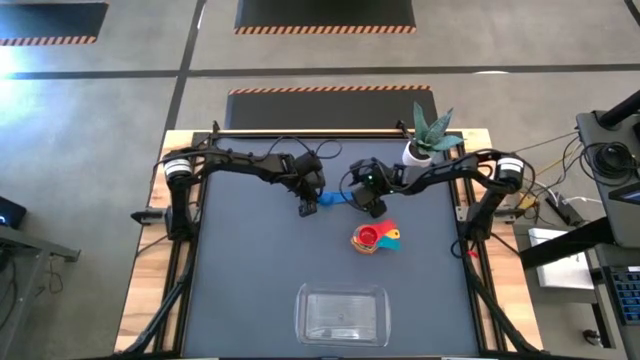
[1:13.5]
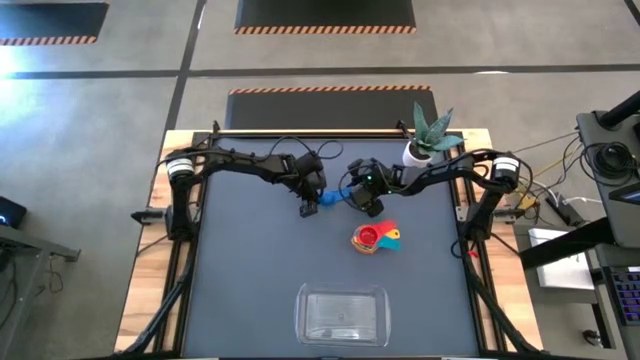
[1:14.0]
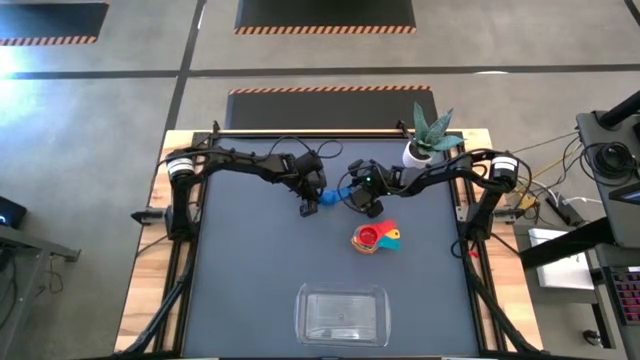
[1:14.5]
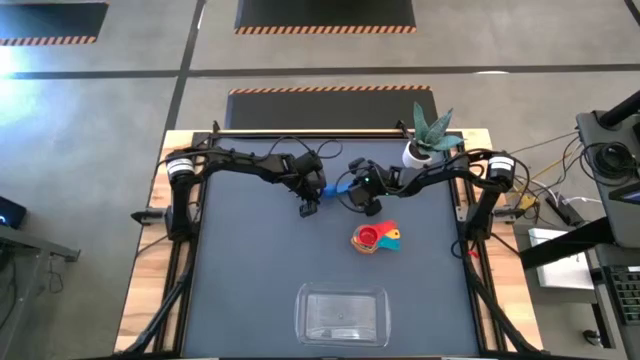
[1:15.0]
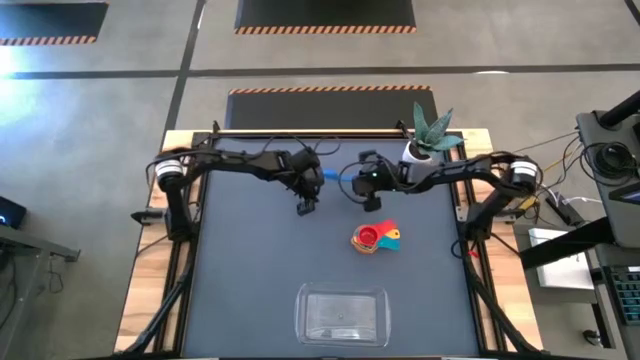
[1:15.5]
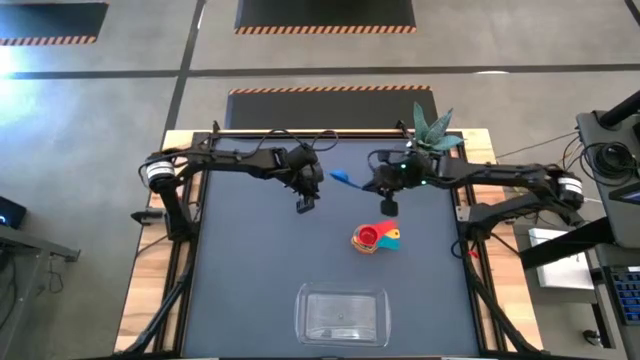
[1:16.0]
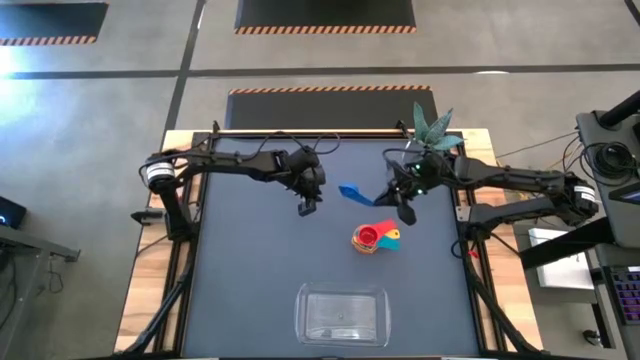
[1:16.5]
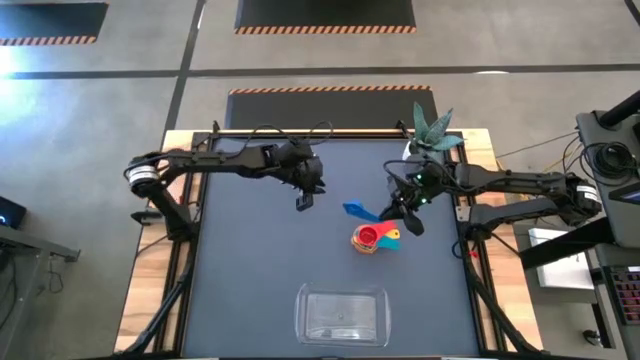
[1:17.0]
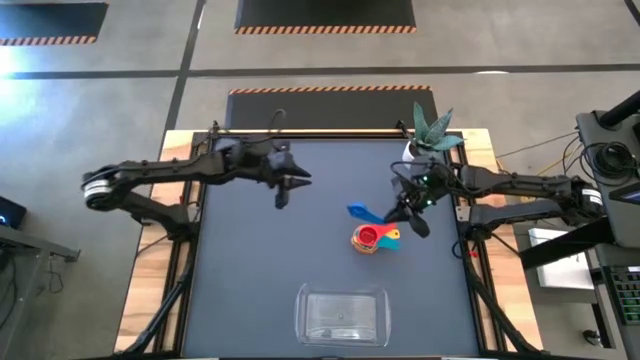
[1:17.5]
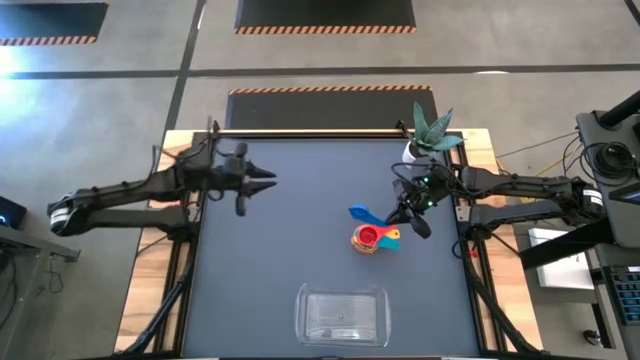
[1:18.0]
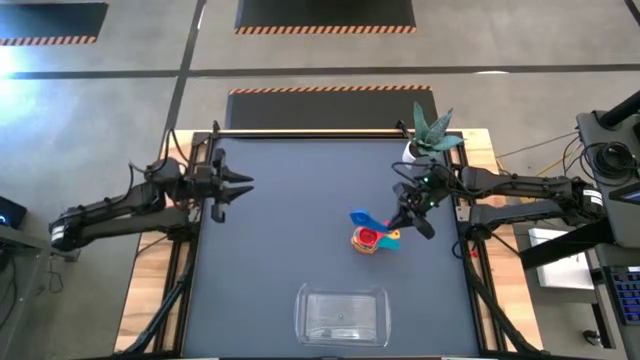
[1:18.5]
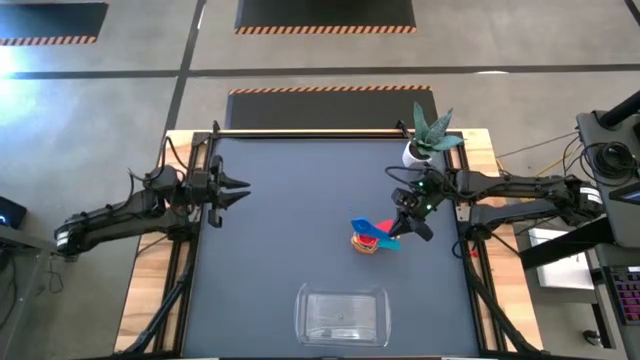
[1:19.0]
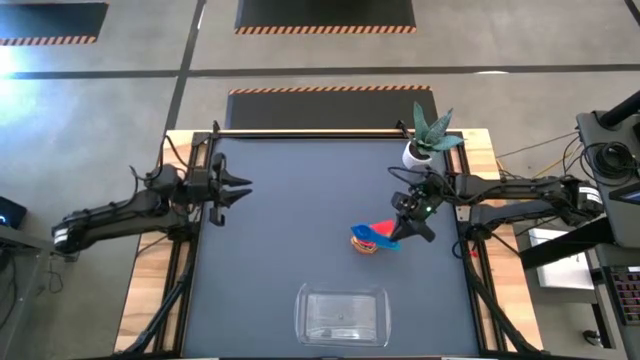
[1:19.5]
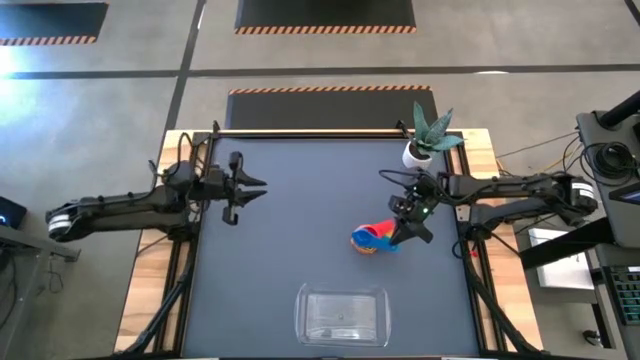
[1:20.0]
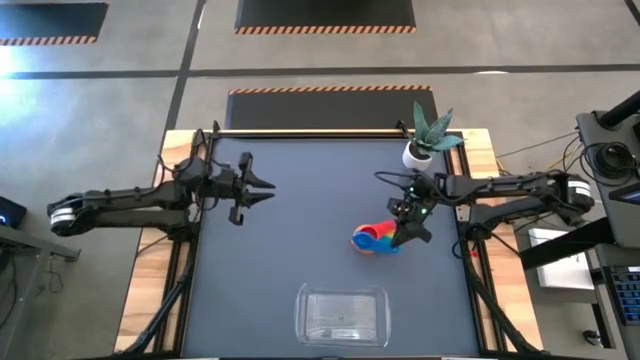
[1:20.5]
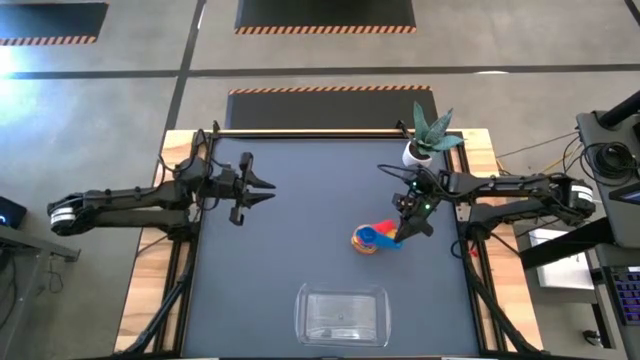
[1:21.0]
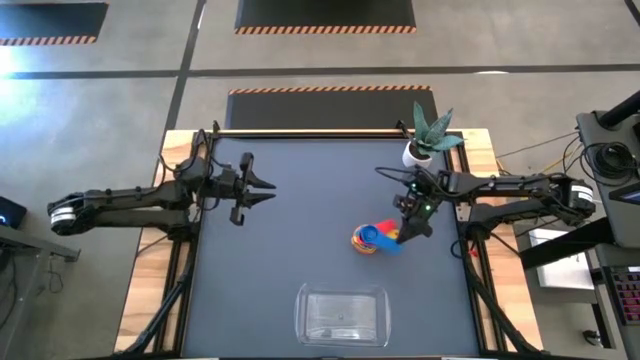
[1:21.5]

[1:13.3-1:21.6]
Task: Nest measuring cups in basket
Stack the red measuring cup into the light blue measuring cup

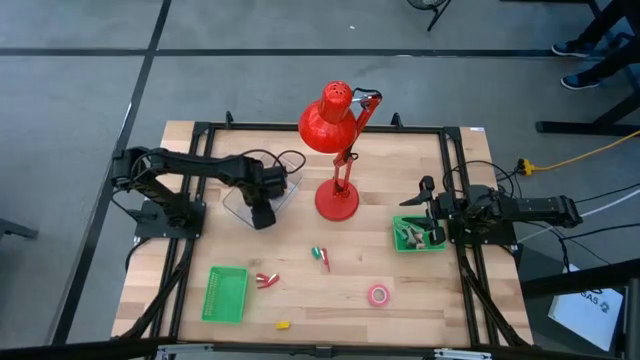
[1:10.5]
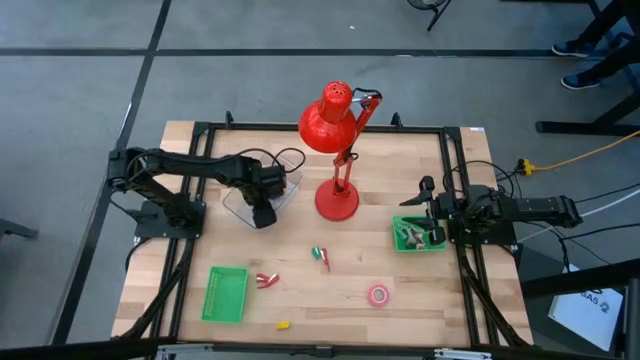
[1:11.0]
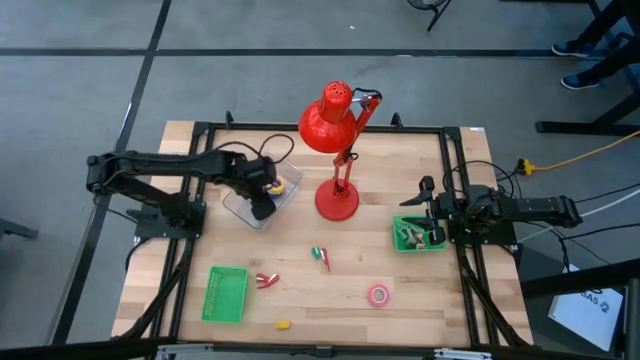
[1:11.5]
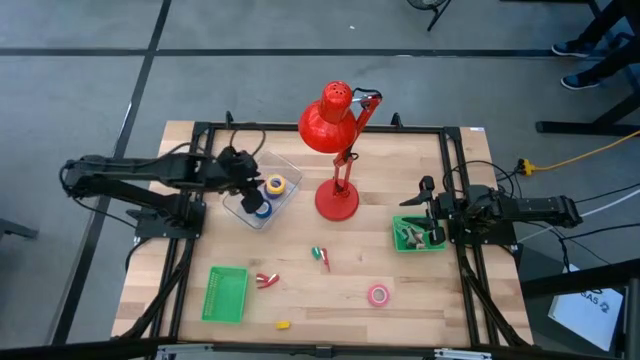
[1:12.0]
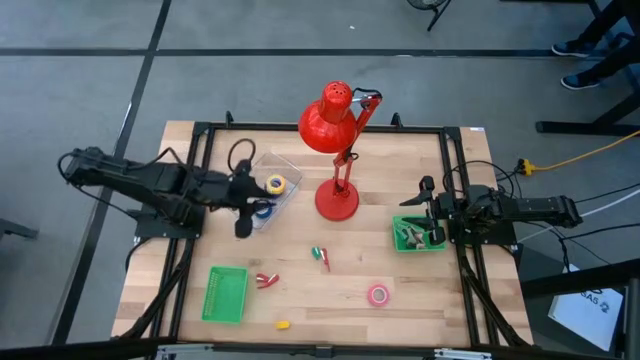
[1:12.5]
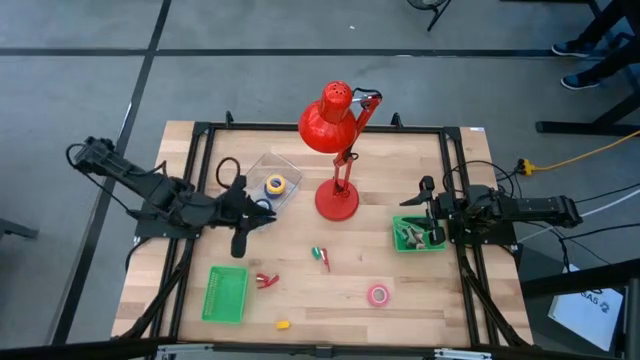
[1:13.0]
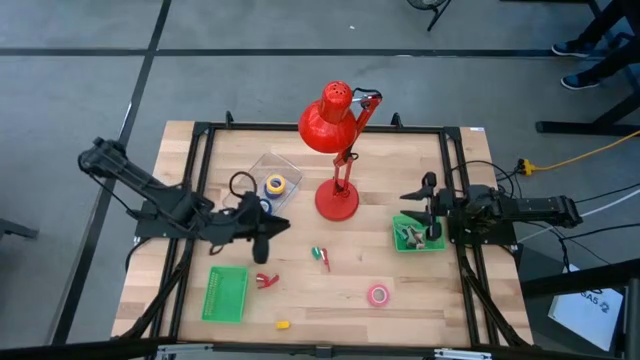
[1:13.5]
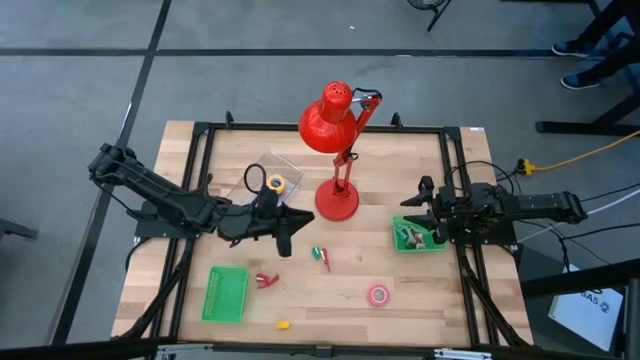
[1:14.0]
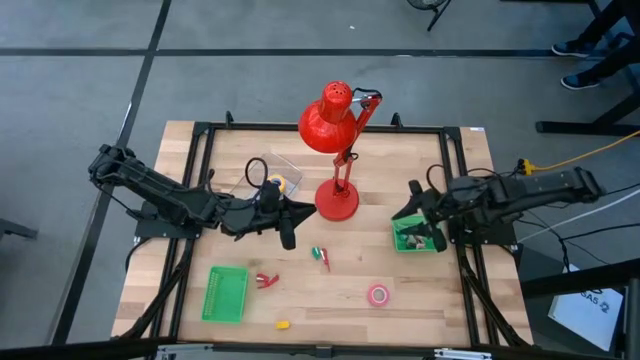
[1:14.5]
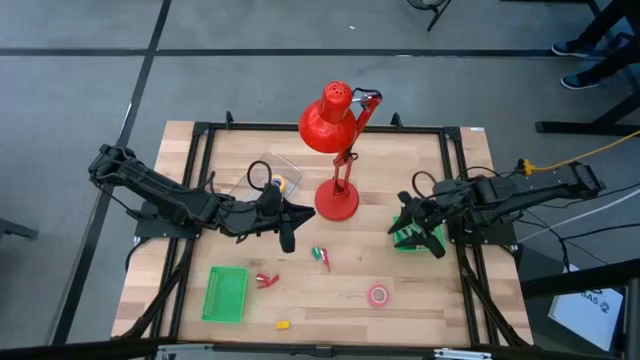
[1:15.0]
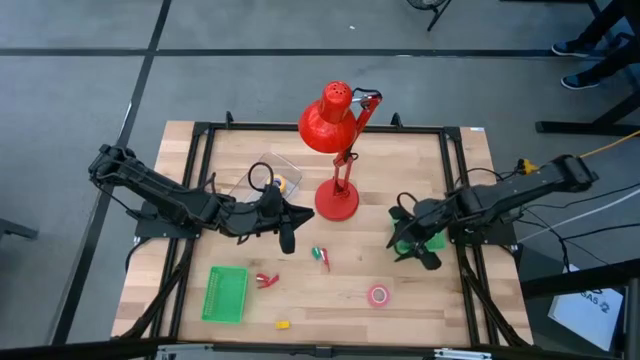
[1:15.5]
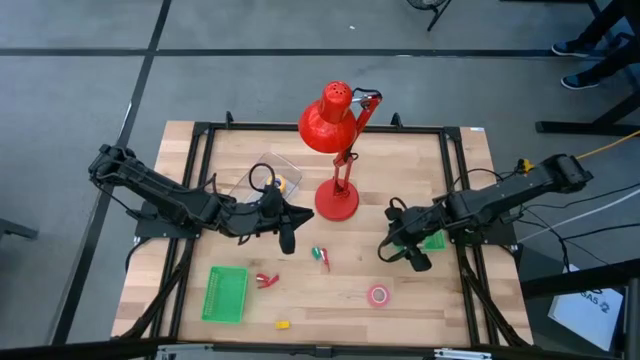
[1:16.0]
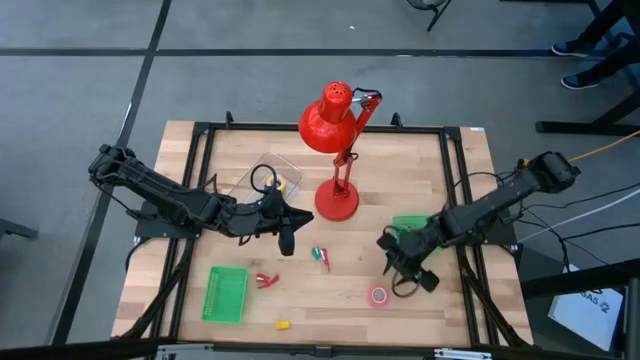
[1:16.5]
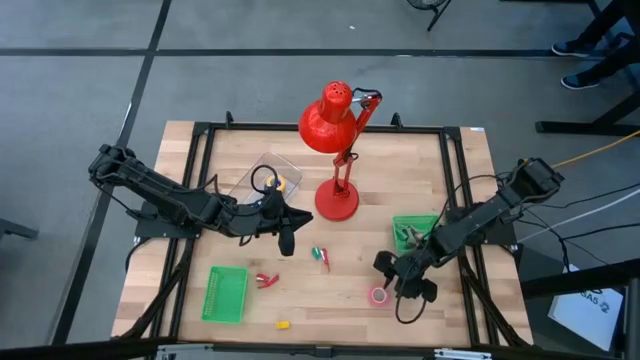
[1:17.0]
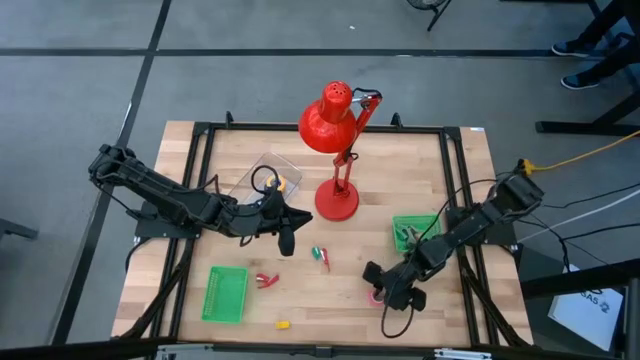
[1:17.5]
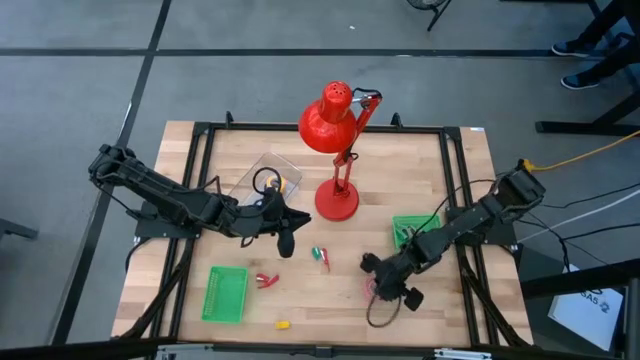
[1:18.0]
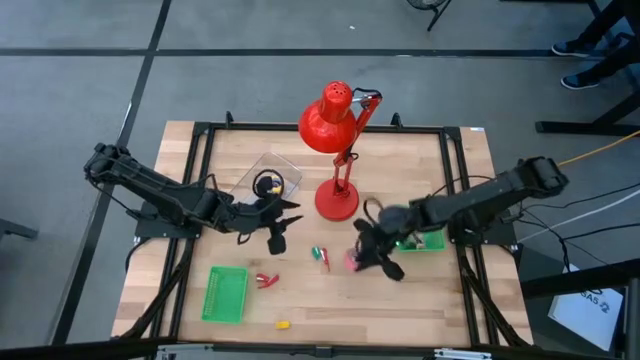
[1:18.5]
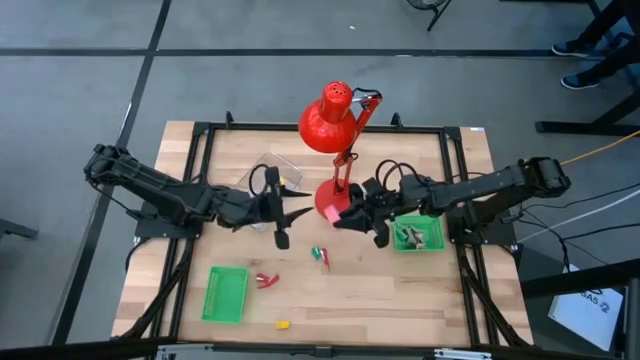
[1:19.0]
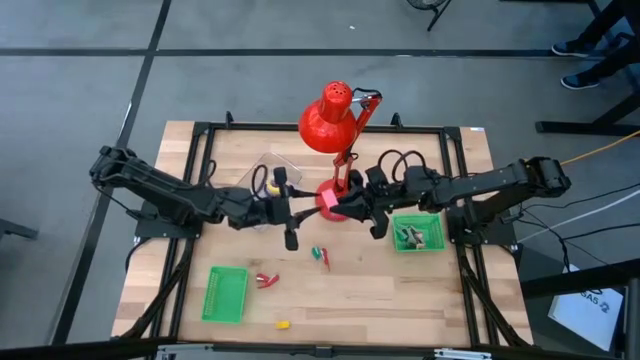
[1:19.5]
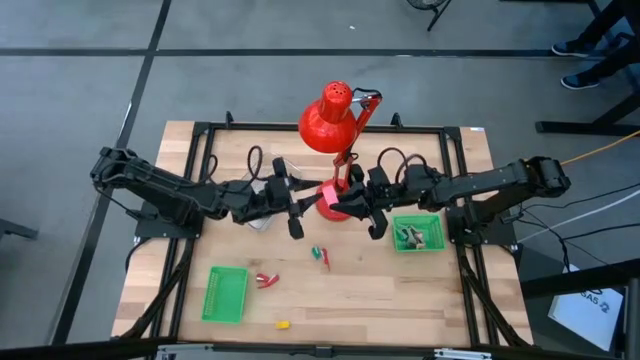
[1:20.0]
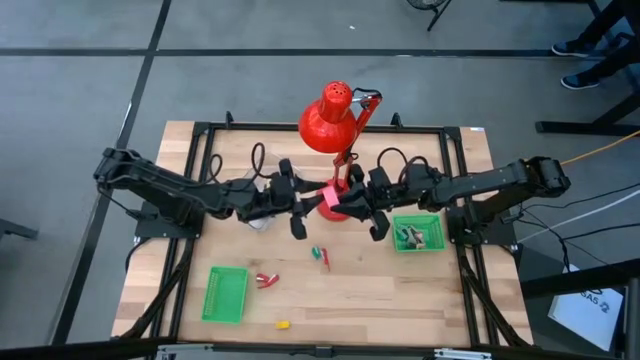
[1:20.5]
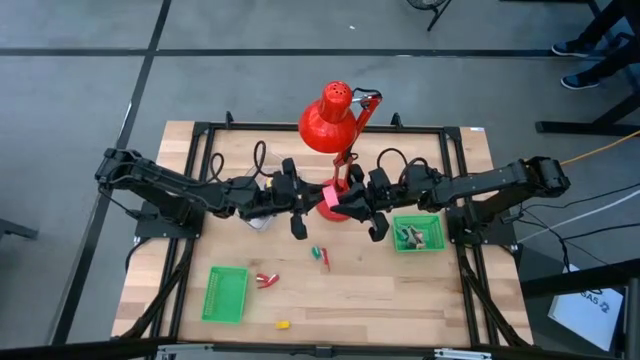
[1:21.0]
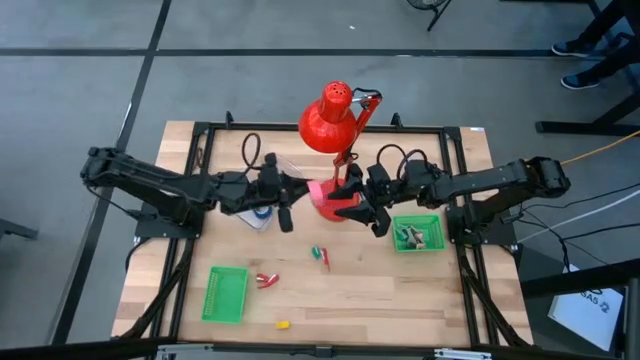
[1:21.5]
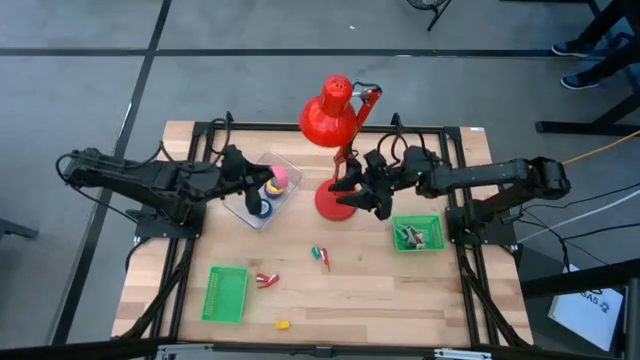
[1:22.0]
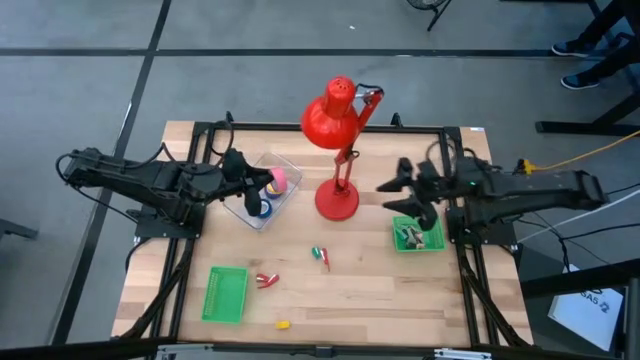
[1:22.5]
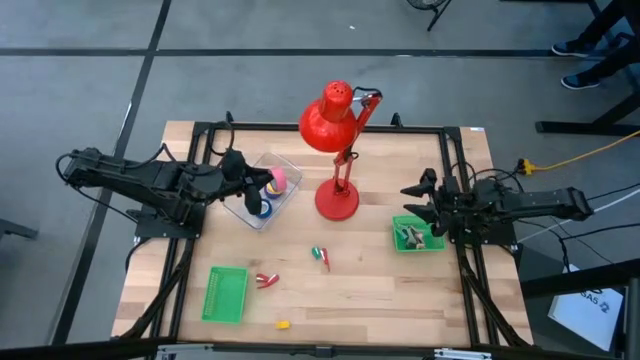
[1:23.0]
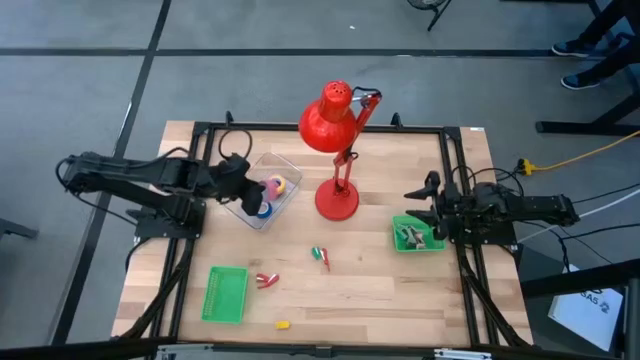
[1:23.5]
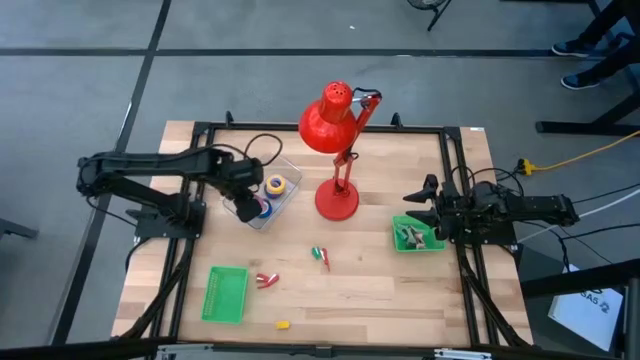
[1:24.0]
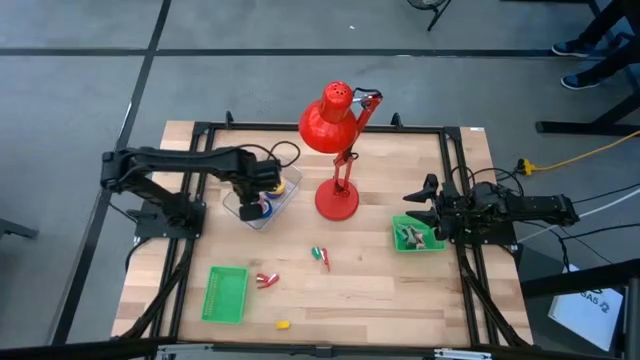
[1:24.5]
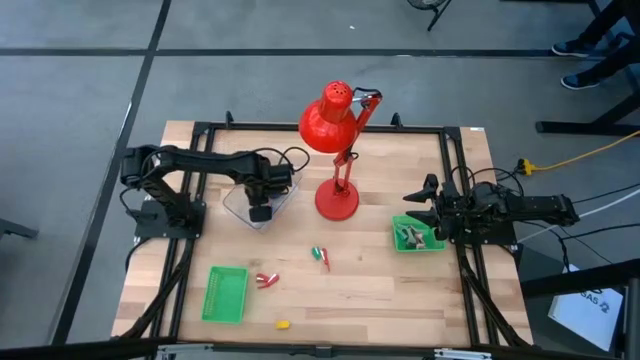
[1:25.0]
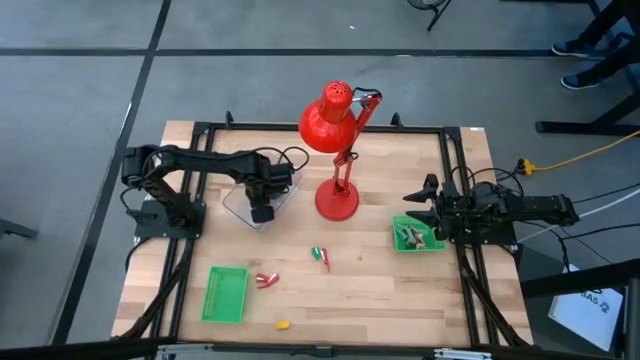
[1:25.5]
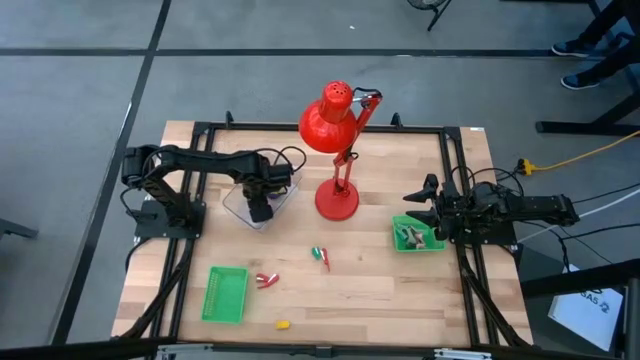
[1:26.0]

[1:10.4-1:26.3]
Task: Pick and place Stapler, Stapler remover, tape
Put the pink tape into the transparent bin
